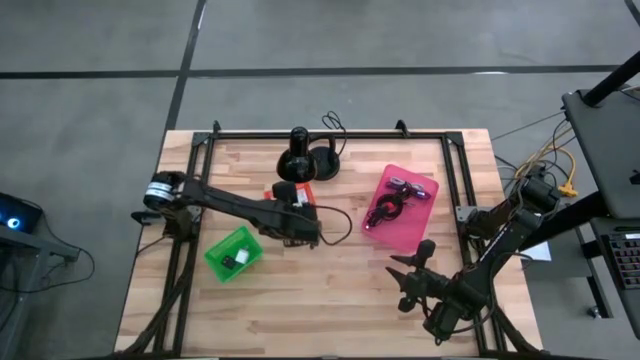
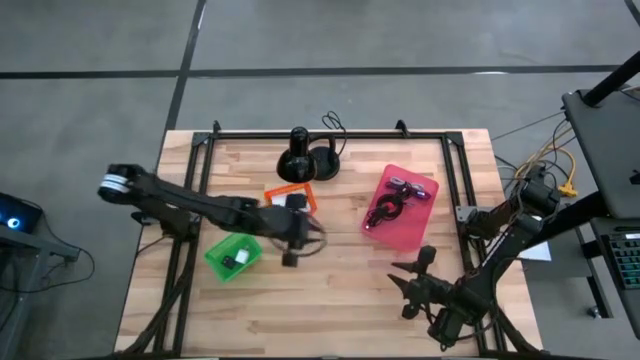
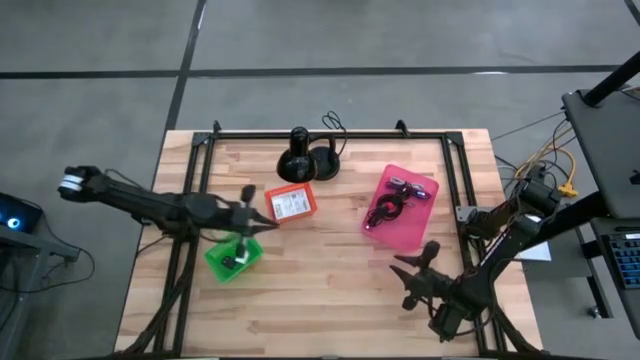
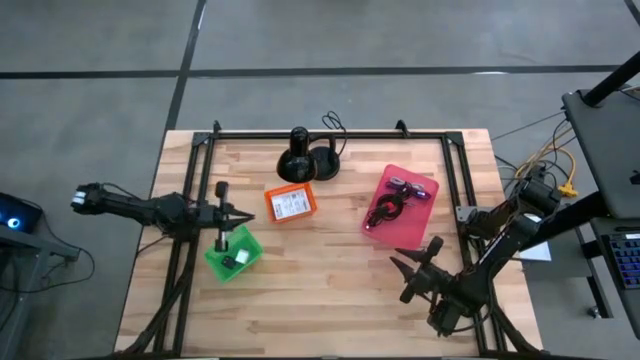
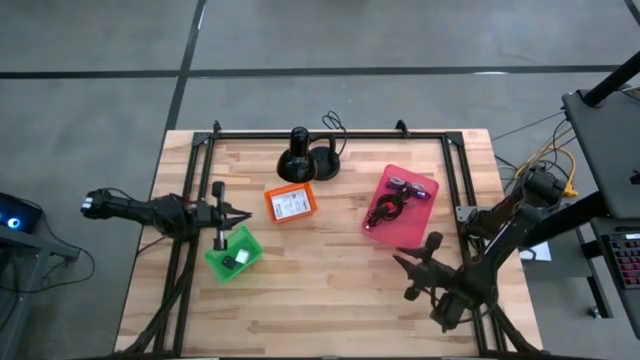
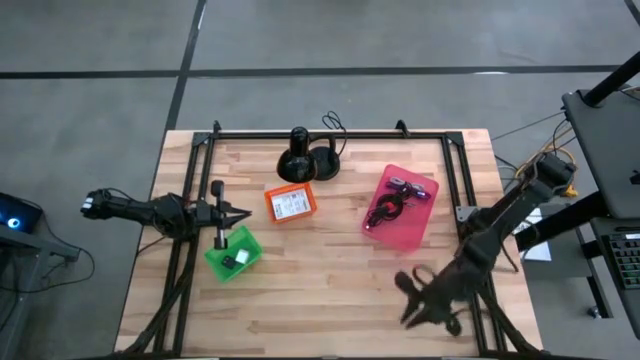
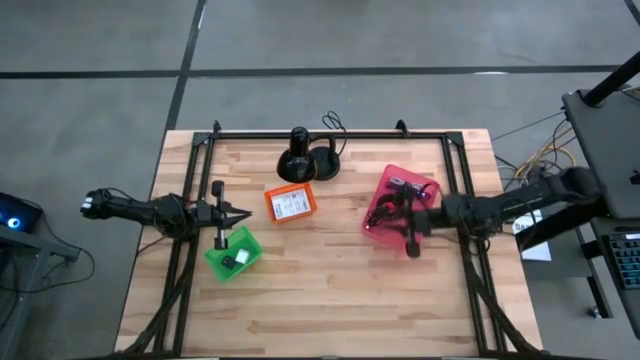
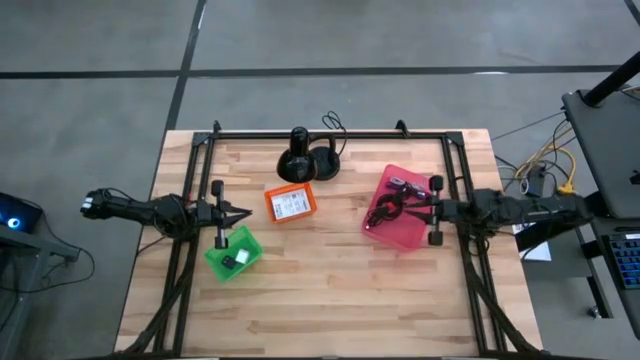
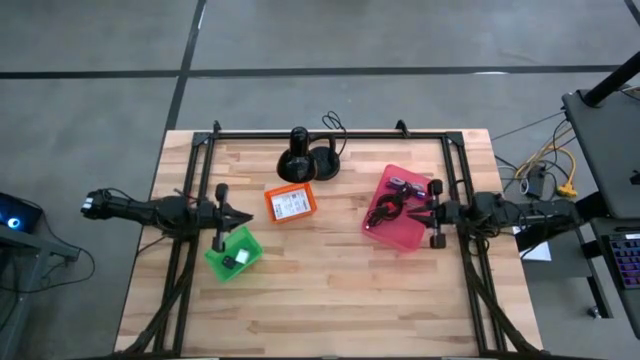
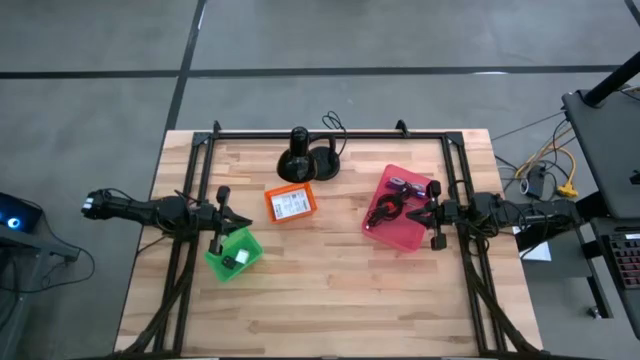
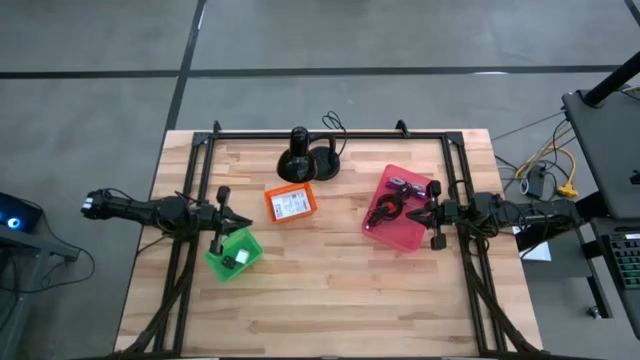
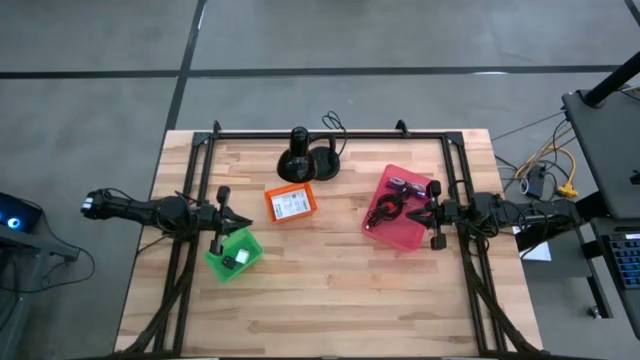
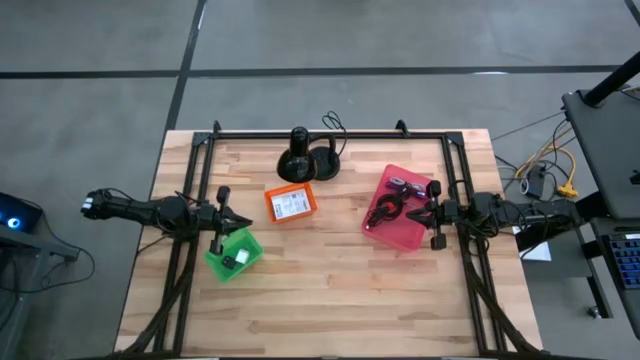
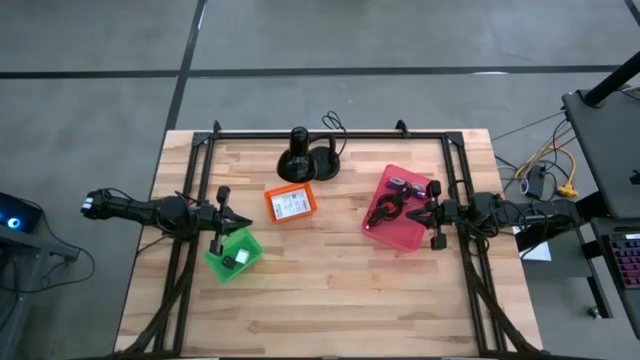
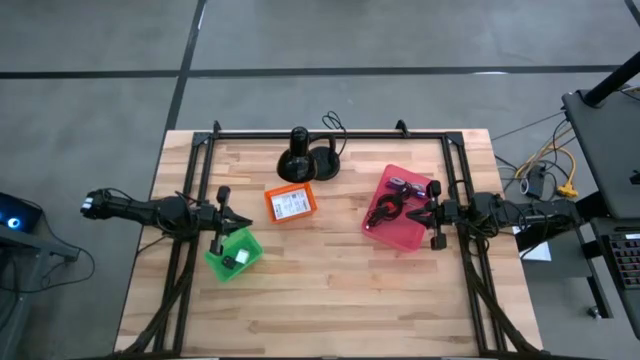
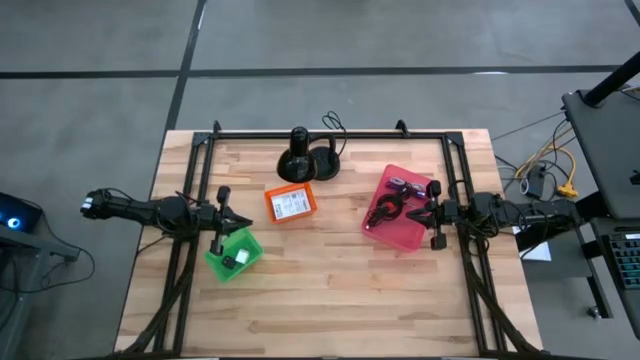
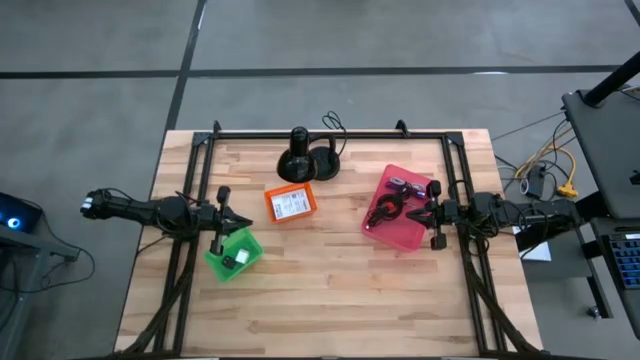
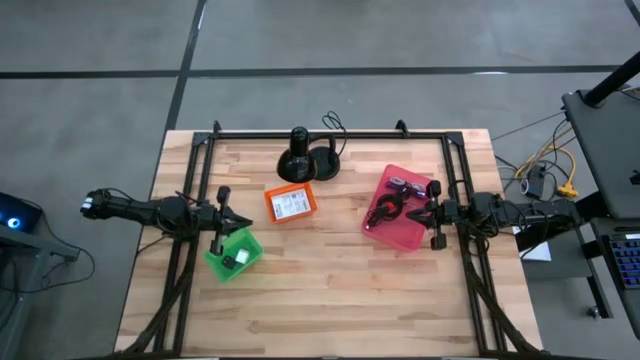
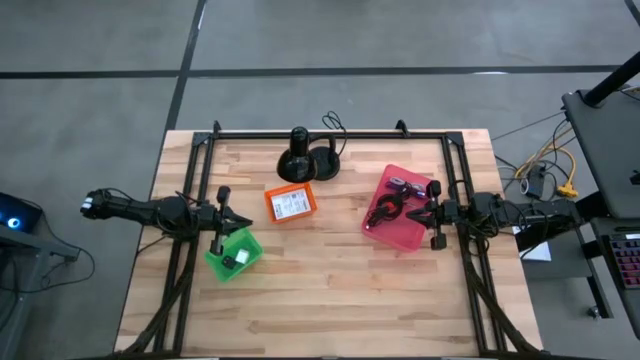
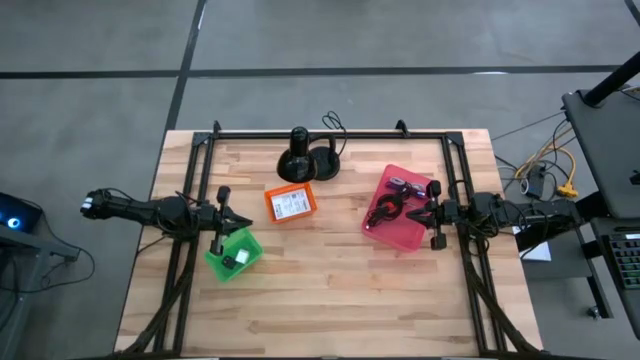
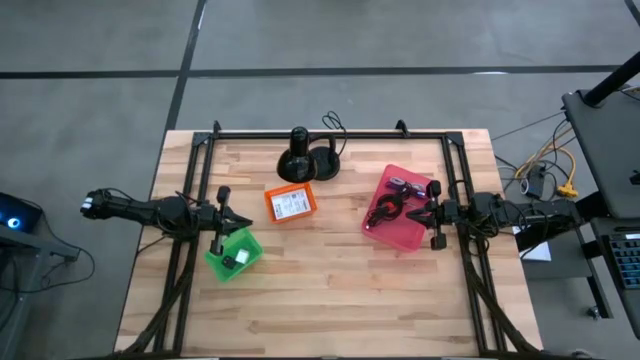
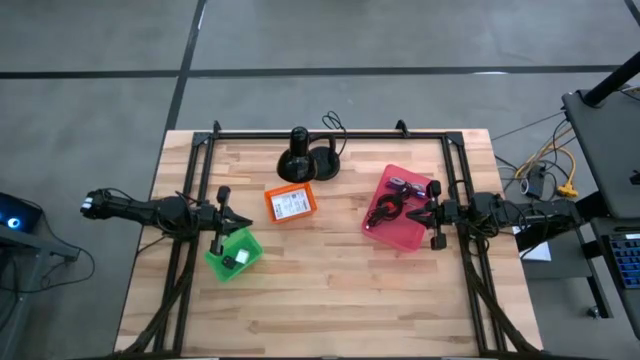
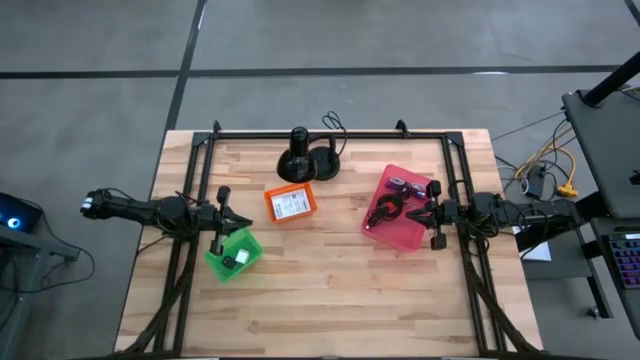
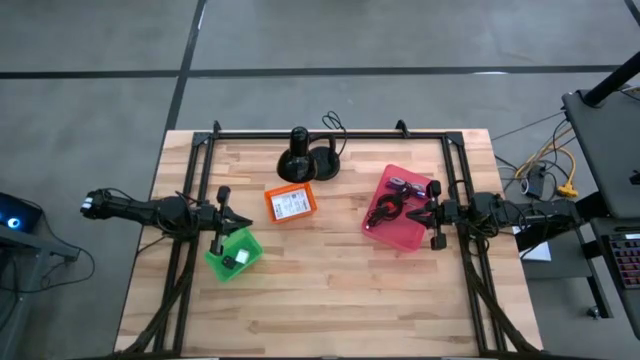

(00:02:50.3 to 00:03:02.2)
Task: Pick and place items into bin
Return to Home Position
